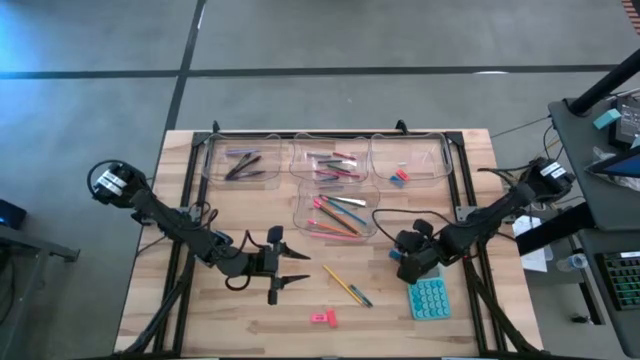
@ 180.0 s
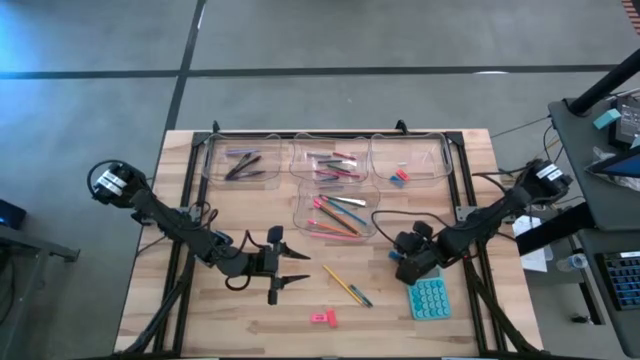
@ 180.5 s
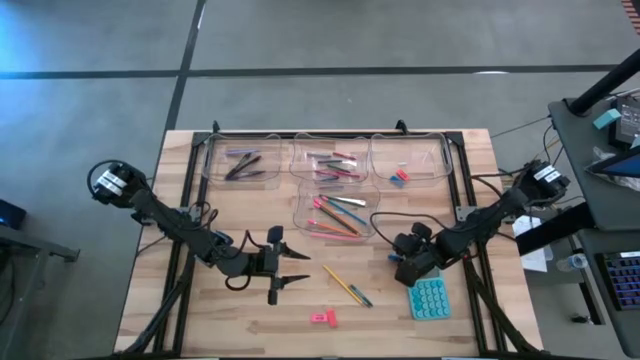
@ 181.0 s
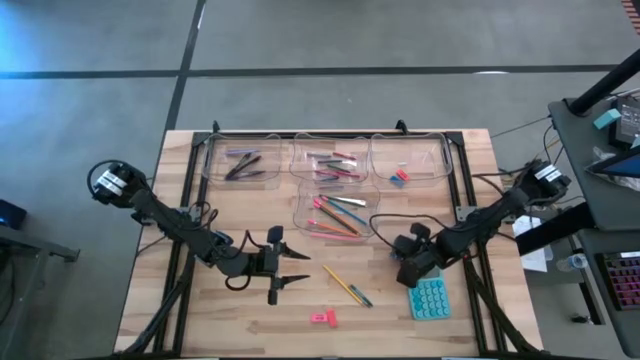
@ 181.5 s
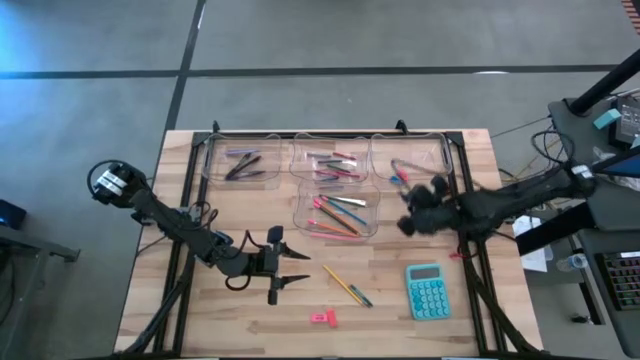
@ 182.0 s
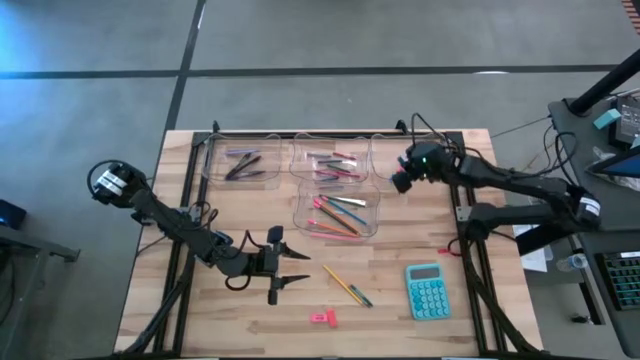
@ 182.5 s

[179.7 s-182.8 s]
Task: Sort crayons/erasers/pens/pencils in bins
Put the blue eraser into the top right transparent bin

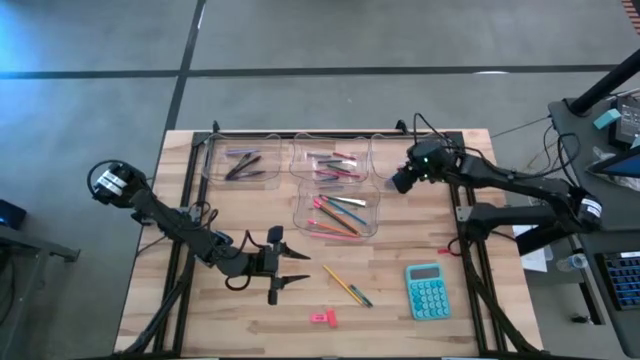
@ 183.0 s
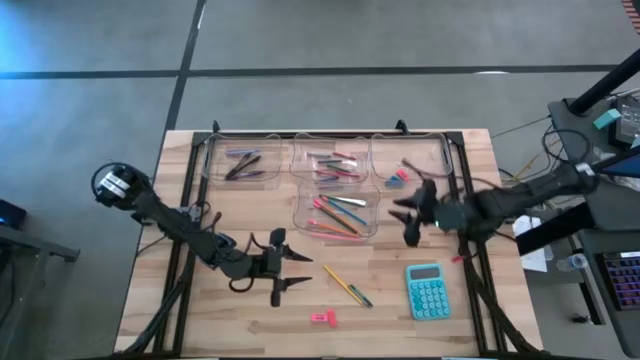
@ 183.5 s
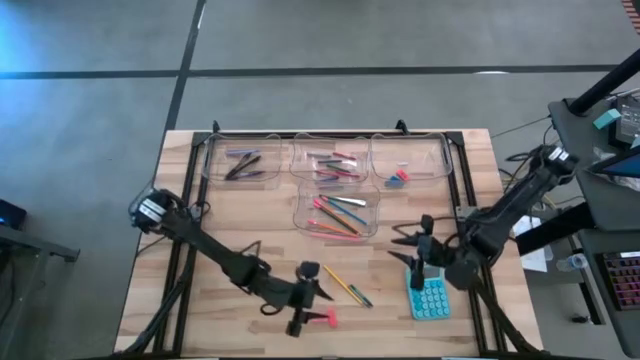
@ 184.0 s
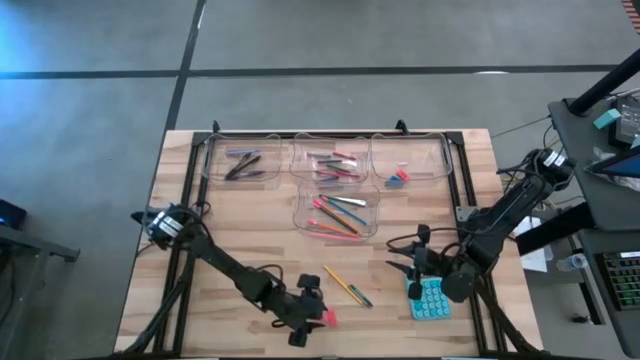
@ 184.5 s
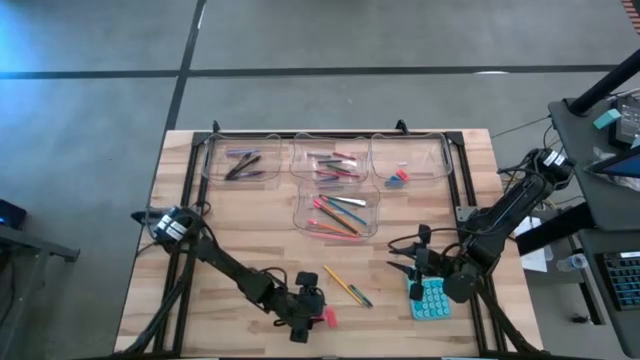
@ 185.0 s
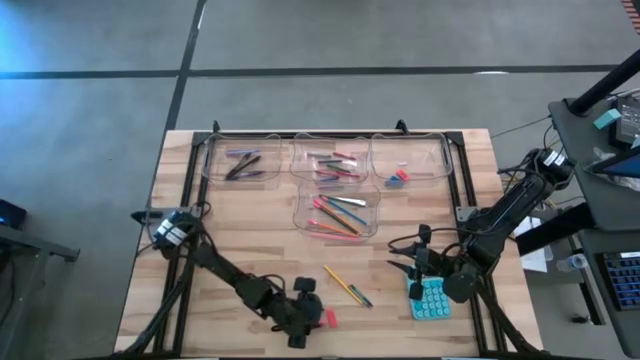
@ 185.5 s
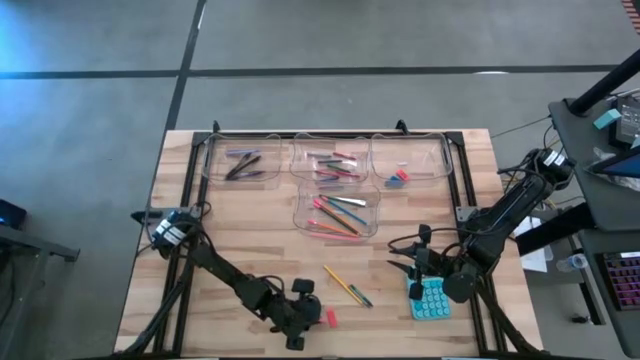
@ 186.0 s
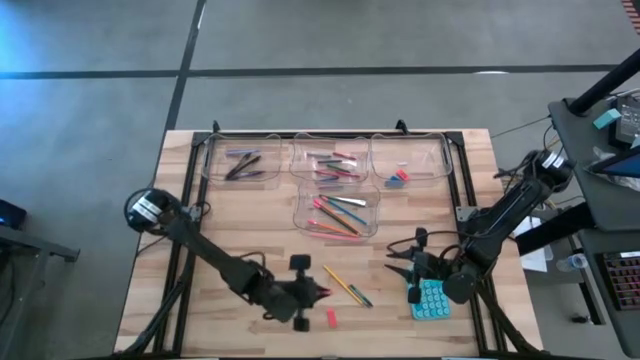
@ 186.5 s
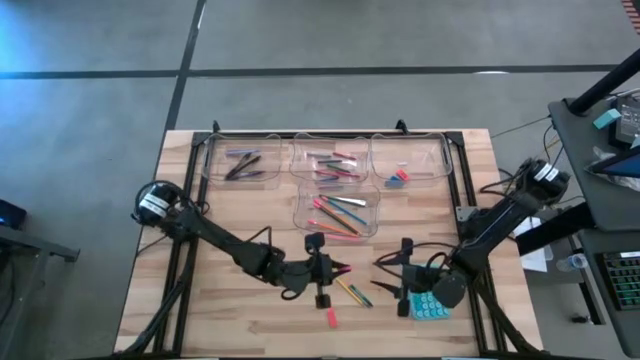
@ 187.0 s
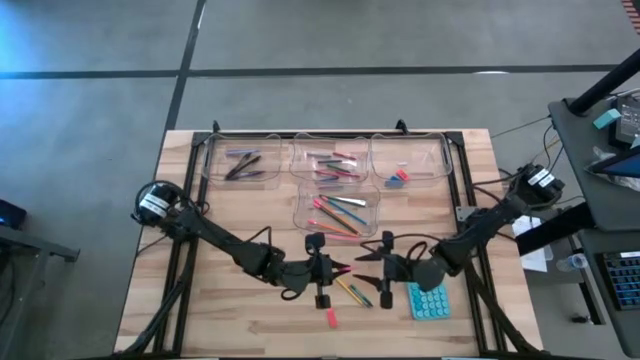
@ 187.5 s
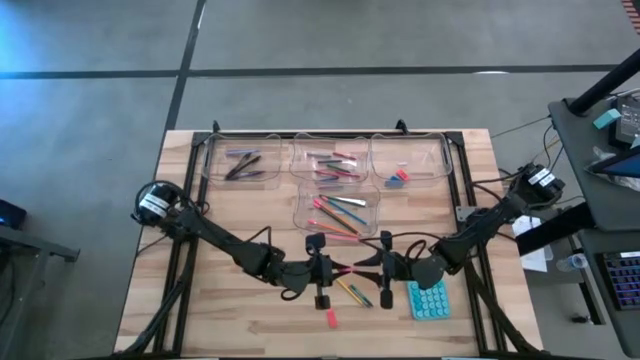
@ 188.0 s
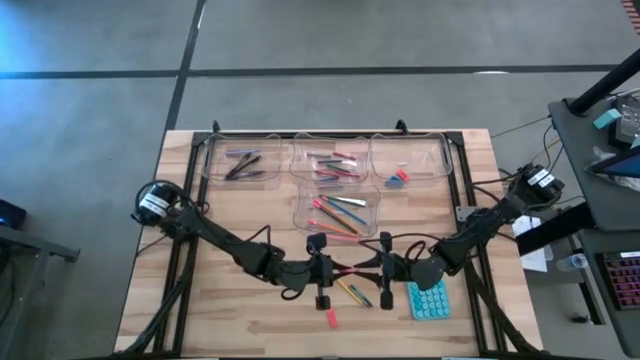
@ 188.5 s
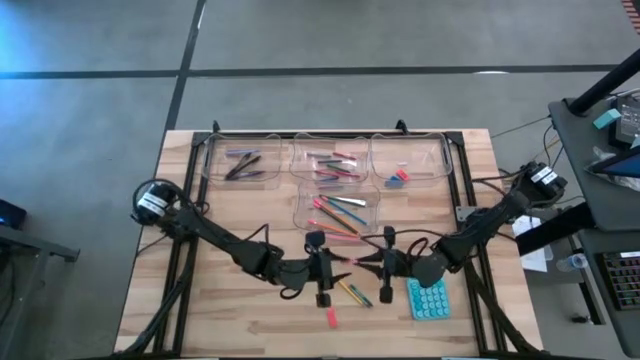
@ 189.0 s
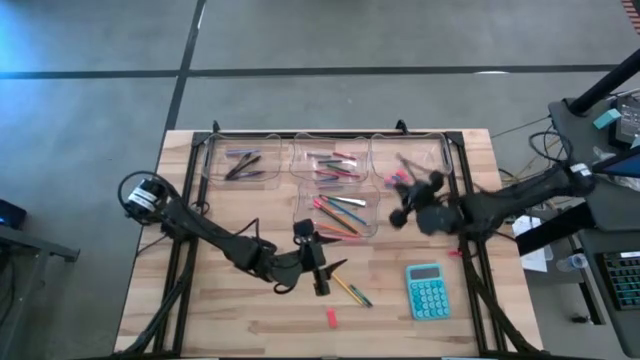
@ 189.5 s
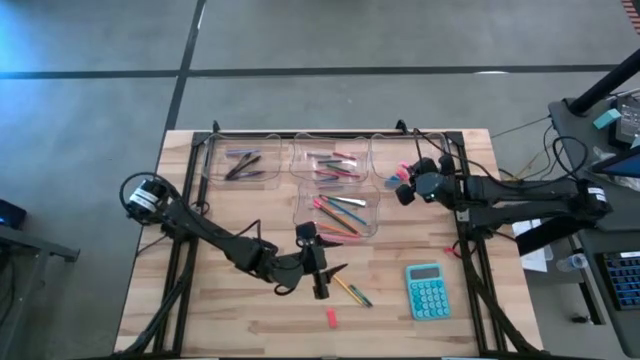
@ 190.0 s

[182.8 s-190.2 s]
Put the pink eraser into the top right transparent bin

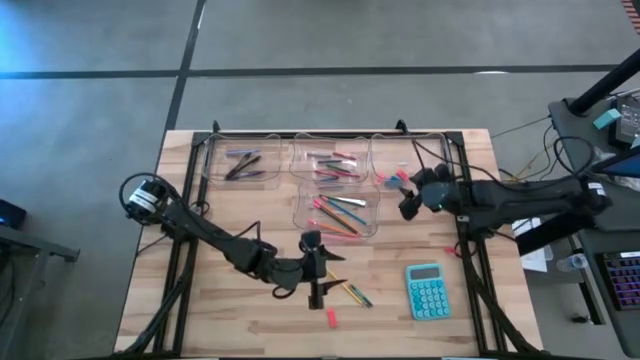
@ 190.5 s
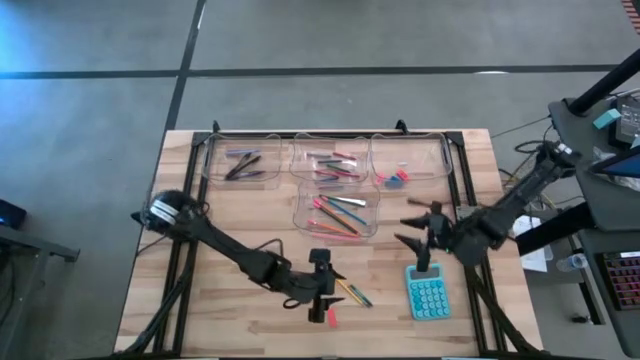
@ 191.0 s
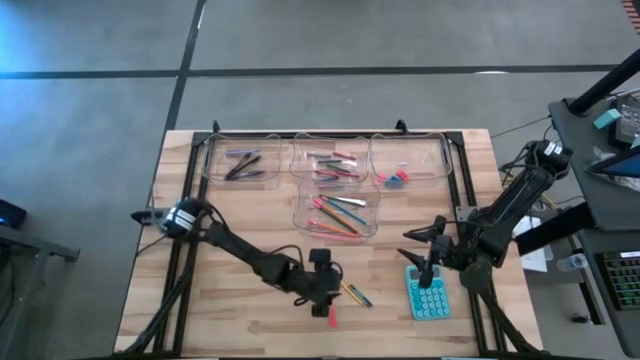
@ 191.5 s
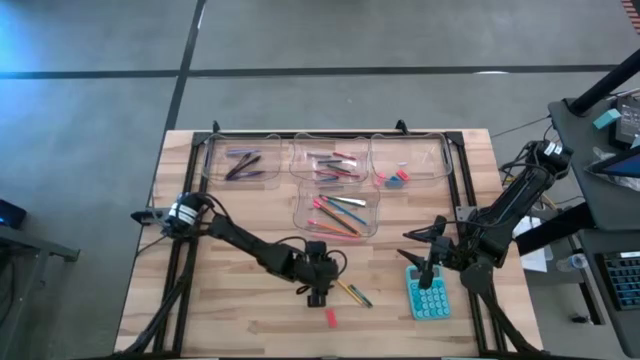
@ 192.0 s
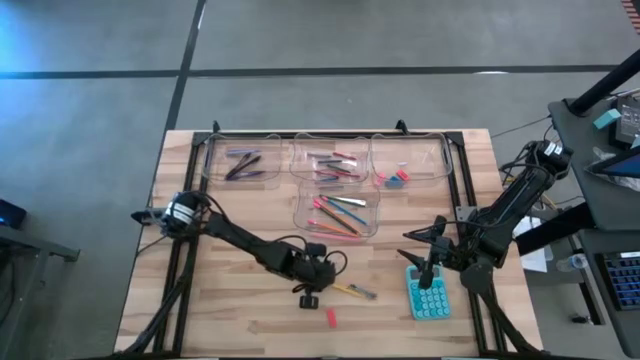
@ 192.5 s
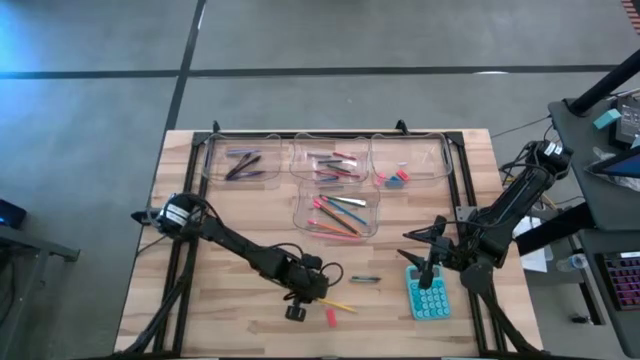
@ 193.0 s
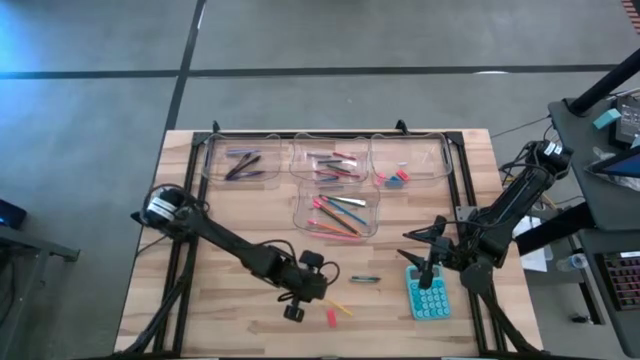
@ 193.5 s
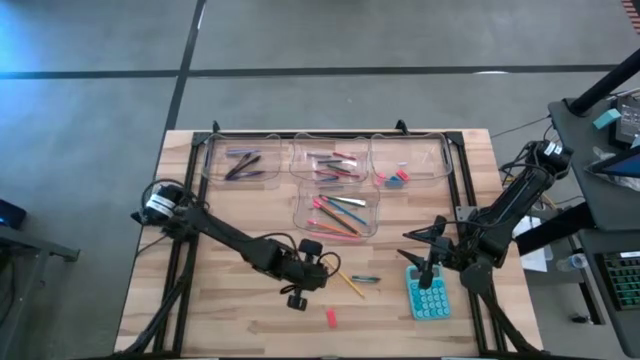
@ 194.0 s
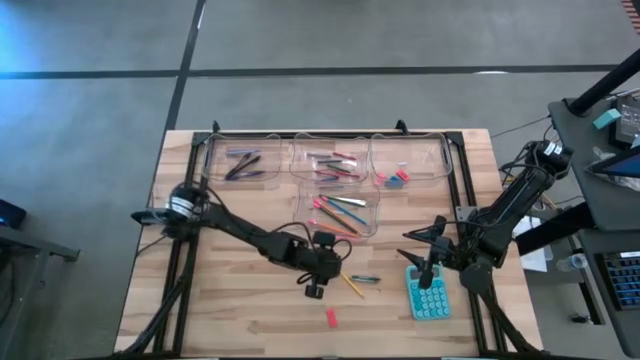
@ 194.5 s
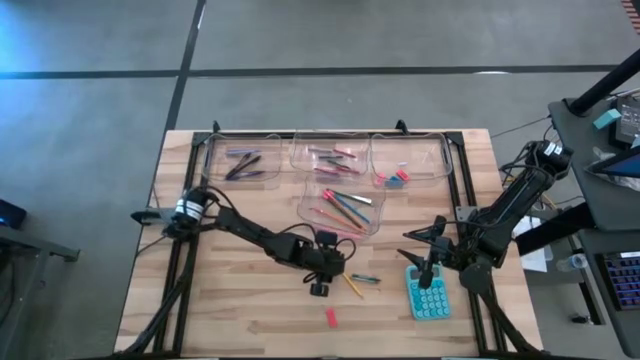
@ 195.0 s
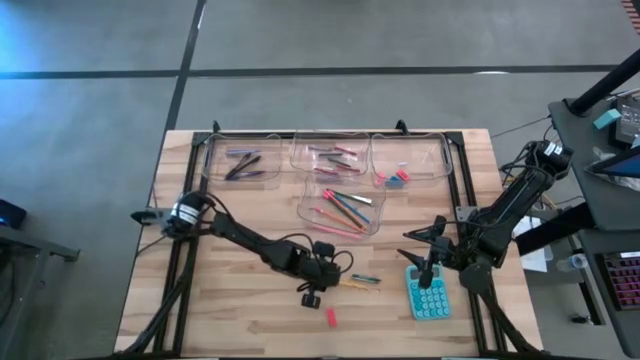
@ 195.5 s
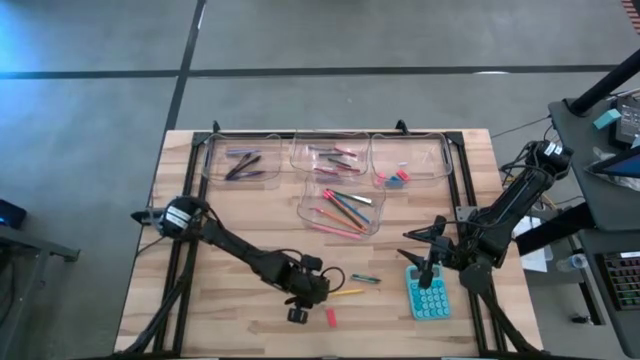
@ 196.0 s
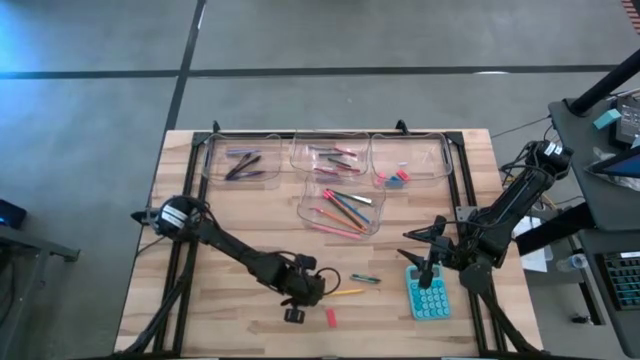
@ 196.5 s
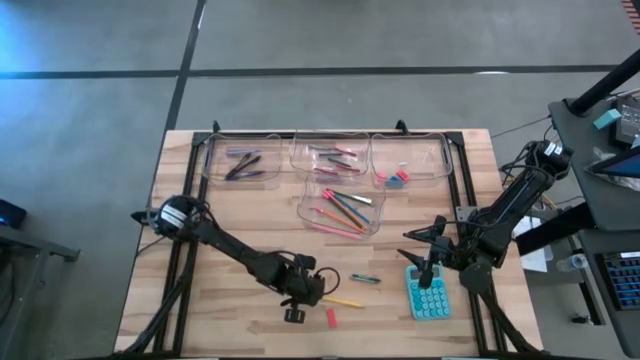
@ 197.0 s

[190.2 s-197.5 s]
Put the yellow pencil into the bottom transparent bin

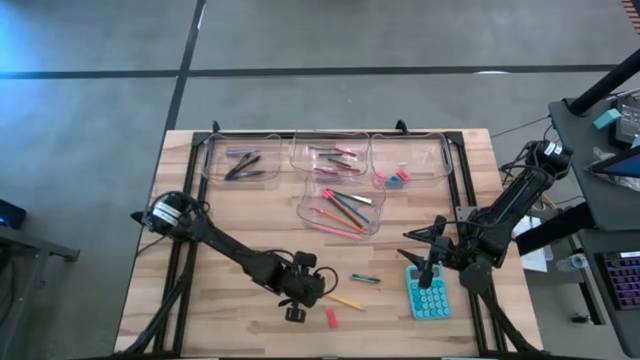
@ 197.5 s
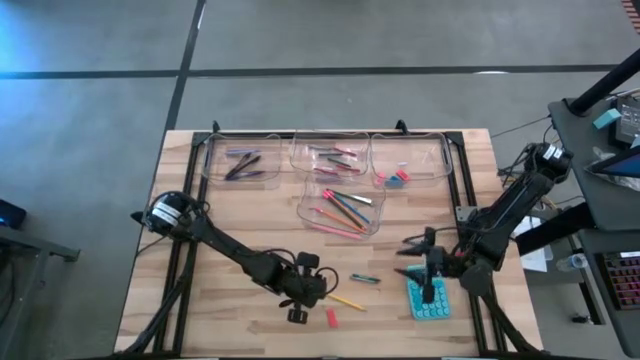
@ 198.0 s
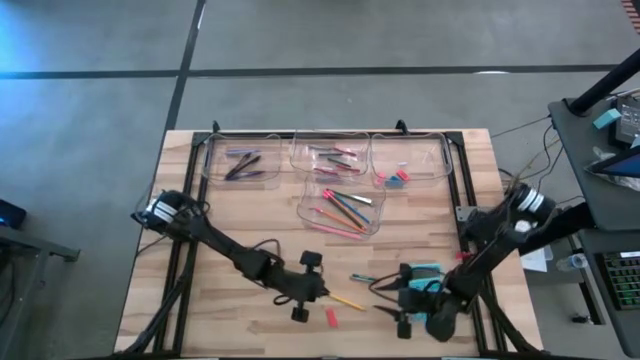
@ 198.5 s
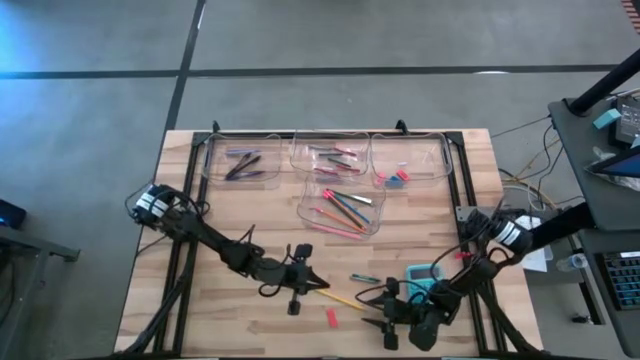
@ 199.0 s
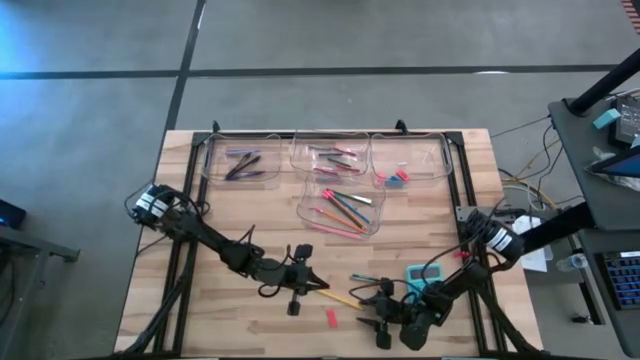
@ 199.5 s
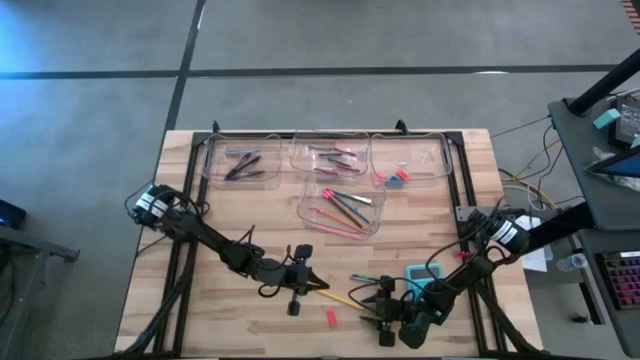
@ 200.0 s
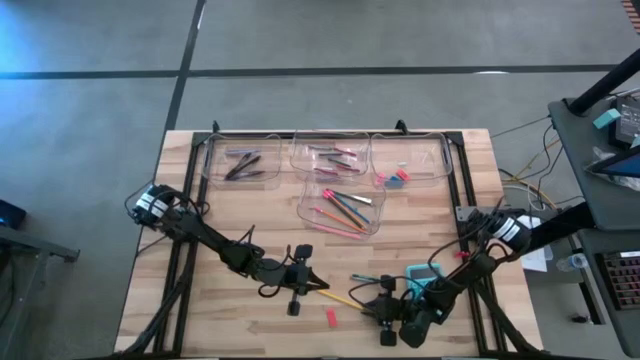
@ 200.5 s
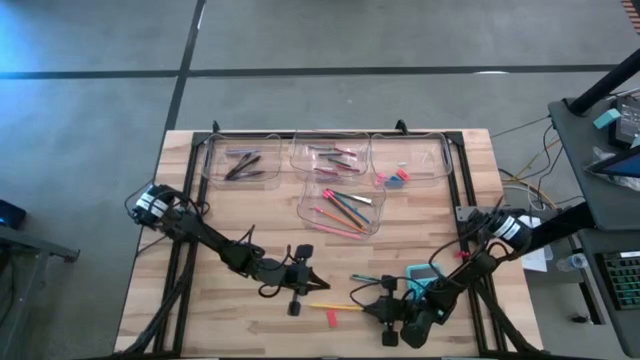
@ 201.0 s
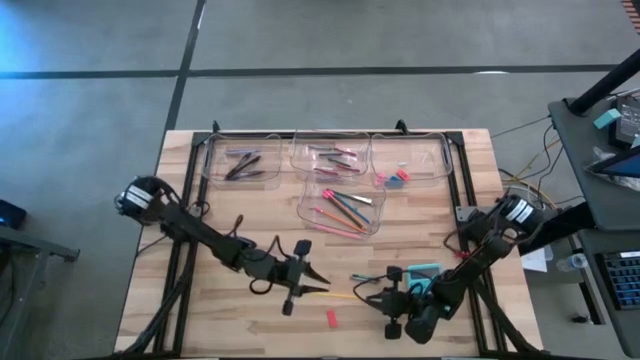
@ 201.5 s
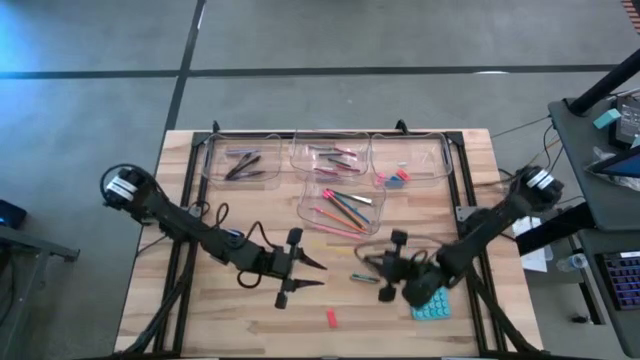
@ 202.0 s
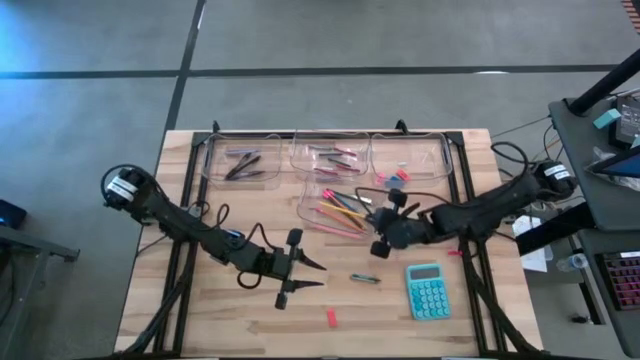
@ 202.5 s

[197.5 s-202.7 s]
Put the yellow pencil into the bottom transparent bin
